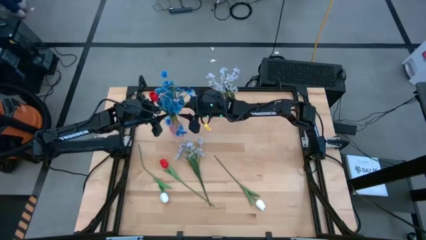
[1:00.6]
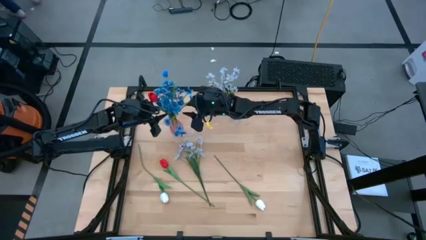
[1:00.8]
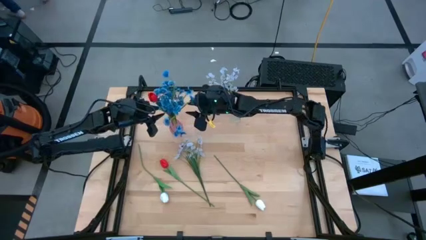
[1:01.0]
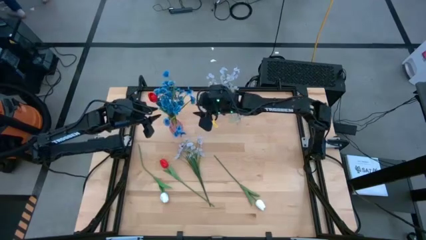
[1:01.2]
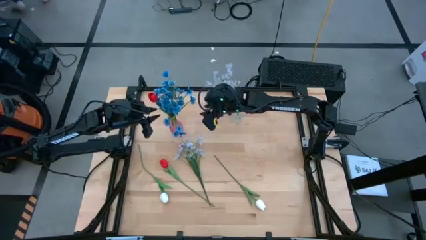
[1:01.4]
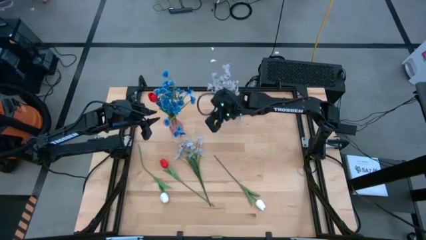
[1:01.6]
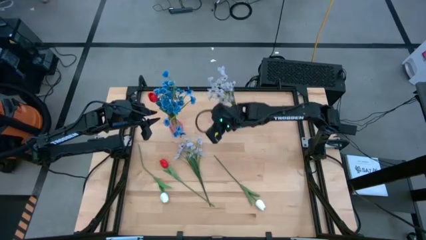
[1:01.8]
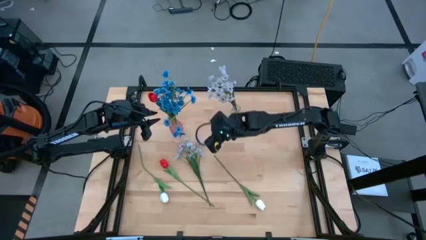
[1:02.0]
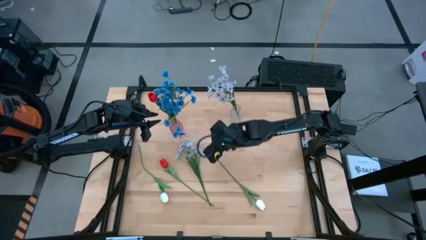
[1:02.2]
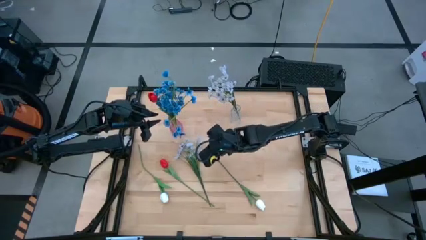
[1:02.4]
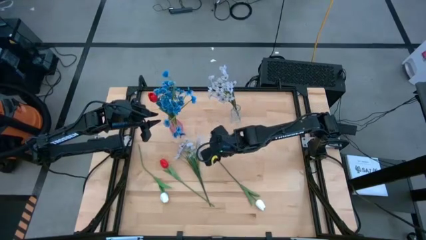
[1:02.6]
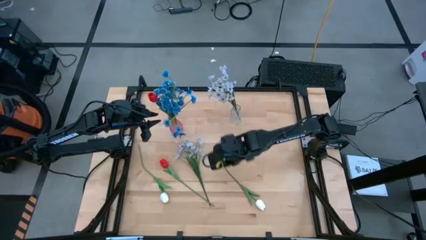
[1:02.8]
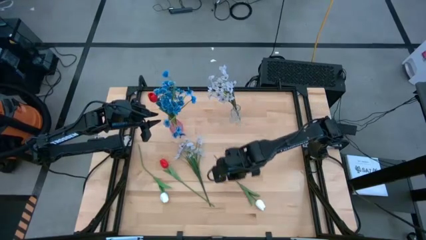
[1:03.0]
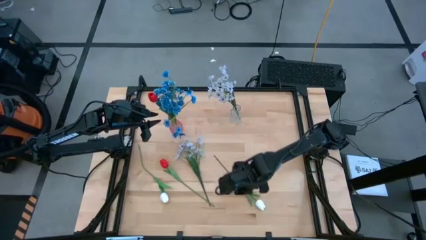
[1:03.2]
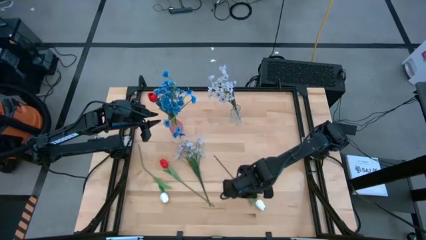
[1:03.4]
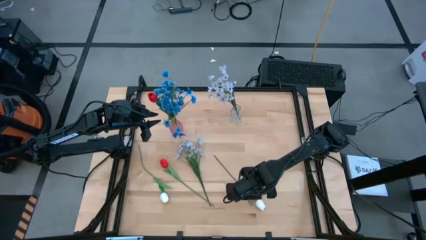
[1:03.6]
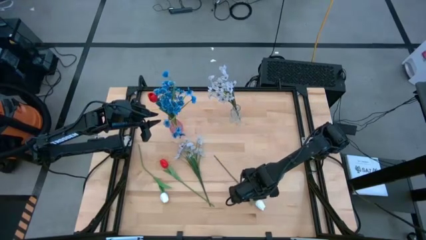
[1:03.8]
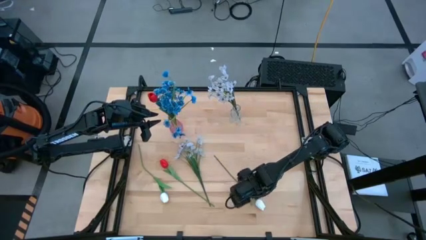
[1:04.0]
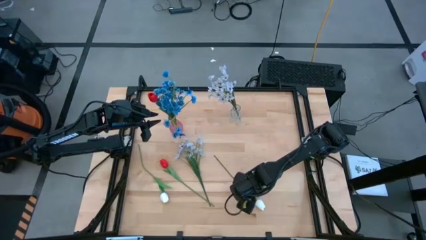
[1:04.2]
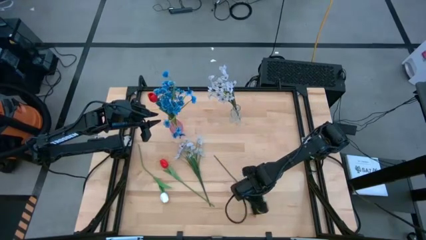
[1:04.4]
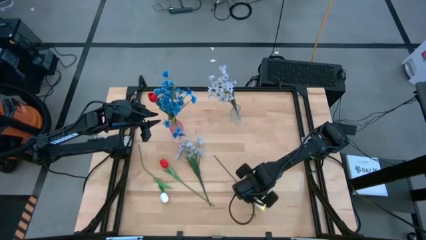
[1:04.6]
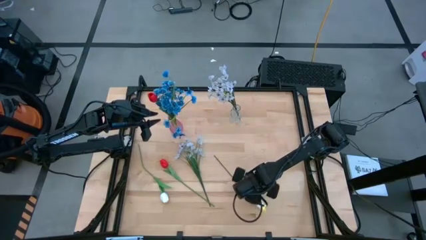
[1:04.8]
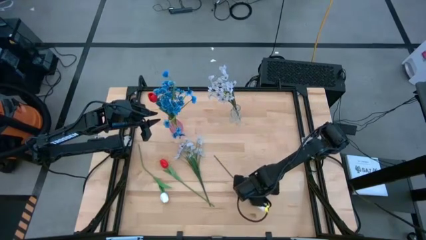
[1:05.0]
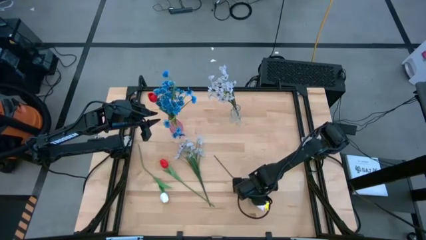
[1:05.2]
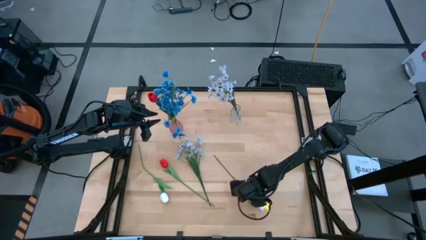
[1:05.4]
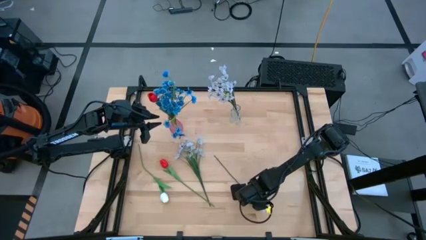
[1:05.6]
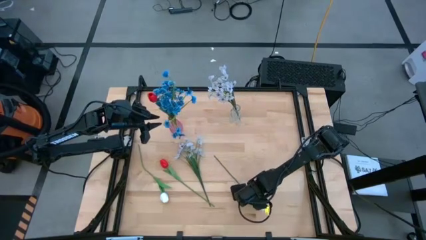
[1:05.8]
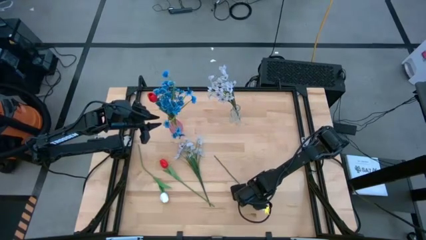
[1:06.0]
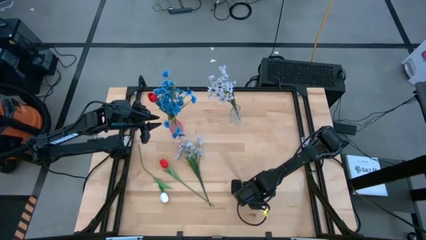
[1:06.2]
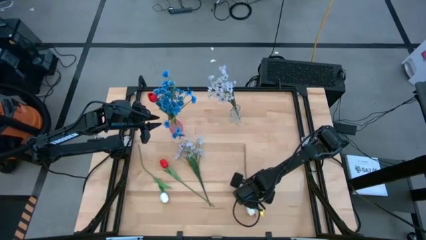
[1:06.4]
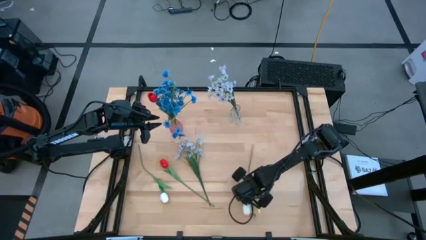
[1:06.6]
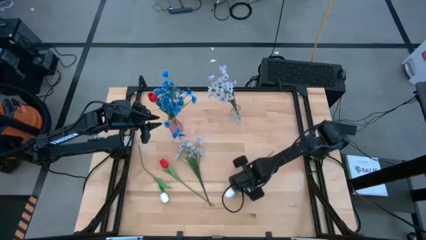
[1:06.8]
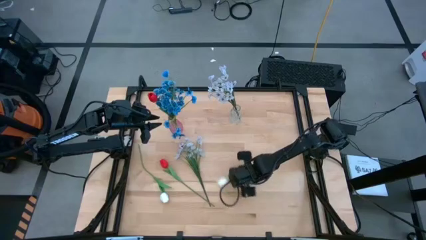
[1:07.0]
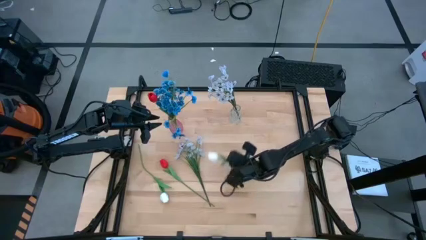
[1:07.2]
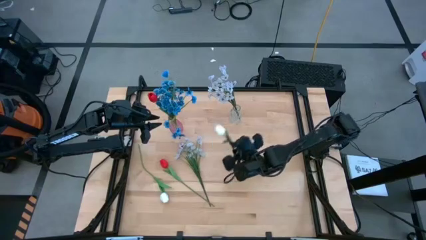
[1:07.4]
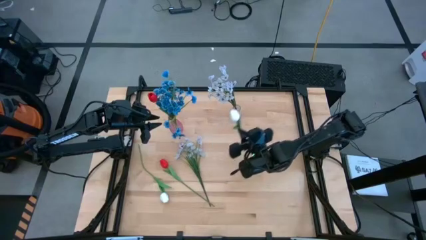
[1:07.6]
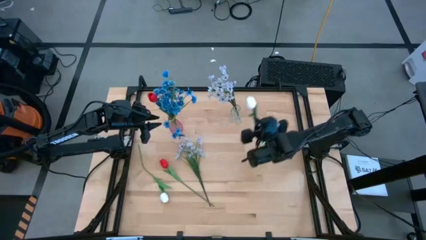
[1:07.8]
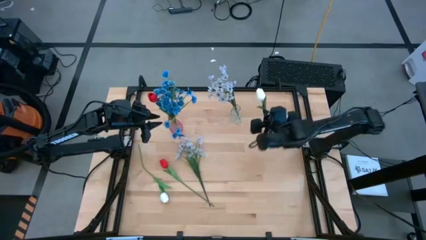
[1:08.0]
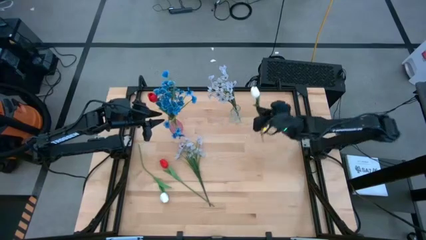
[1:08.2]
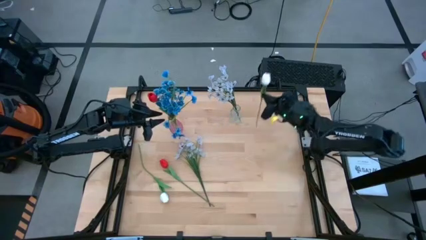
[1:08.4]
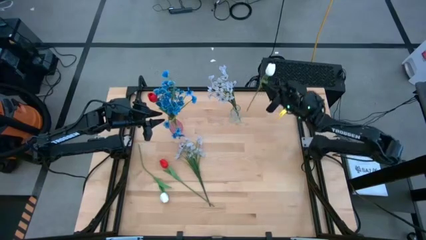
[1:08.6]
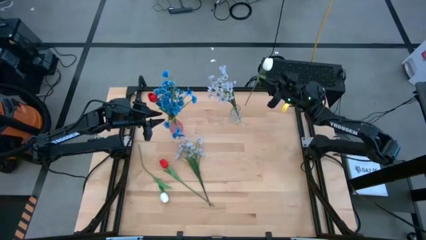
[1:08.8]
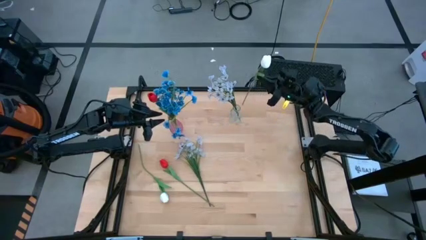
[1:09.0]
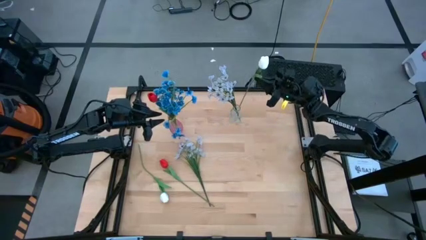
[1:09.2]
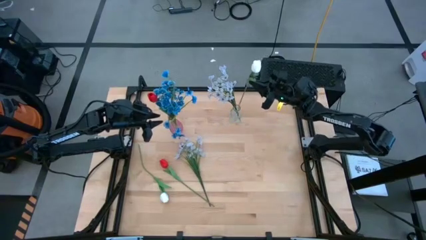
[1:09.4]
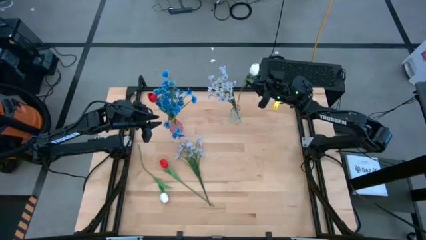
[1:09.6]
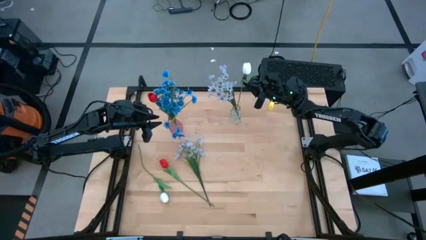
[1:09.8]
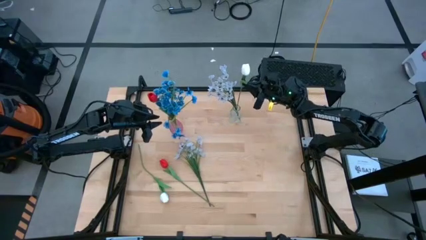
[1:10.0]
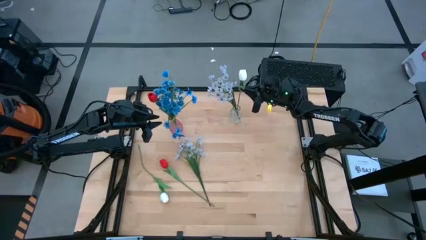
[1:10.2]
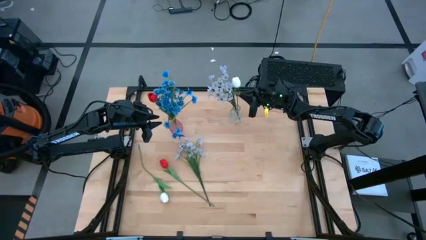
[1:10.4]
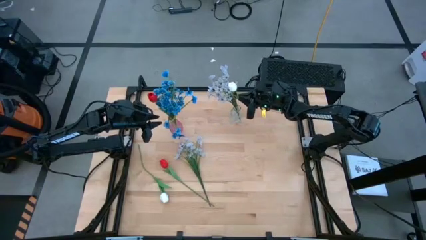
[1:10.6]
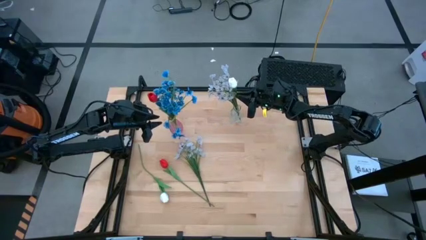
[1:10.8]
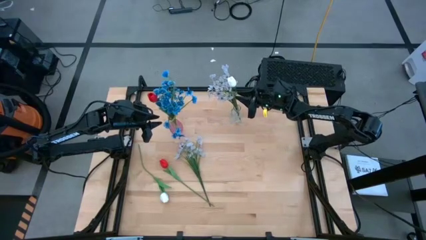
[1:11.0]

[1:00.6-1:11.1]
Task: Sort flowers into vase by color
Put the right white tulip into the transparent vase
